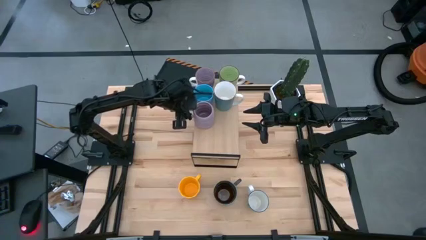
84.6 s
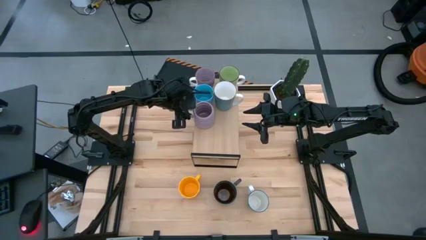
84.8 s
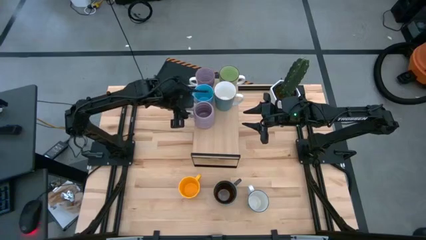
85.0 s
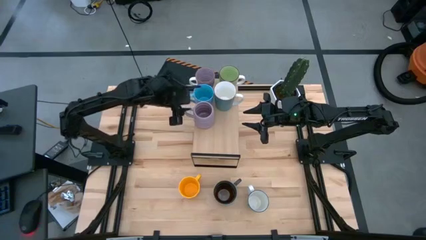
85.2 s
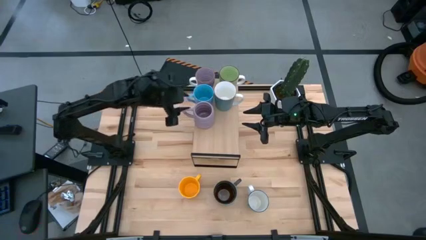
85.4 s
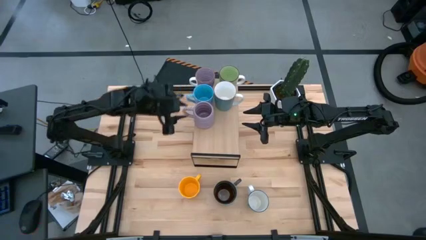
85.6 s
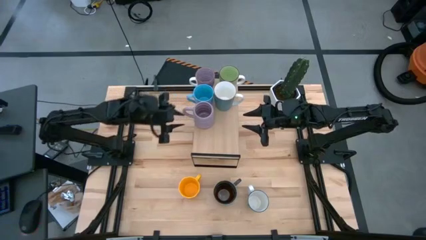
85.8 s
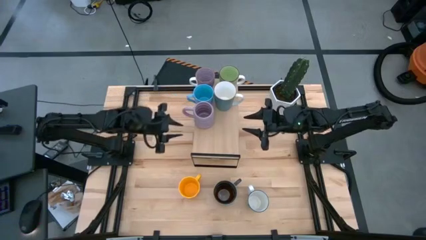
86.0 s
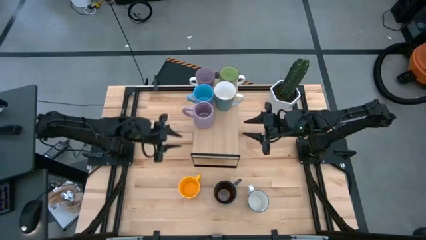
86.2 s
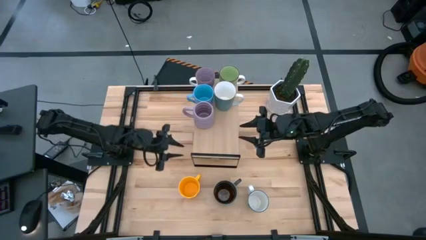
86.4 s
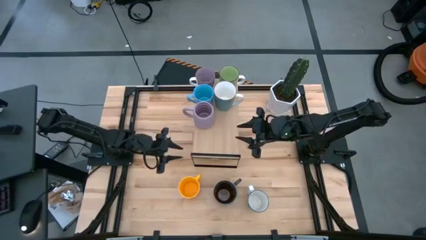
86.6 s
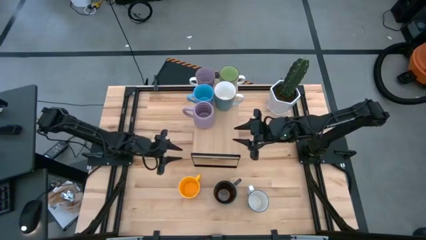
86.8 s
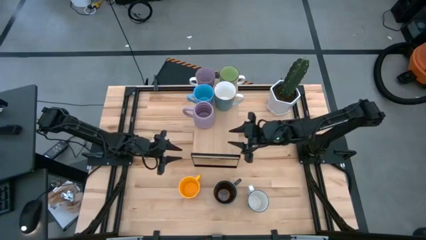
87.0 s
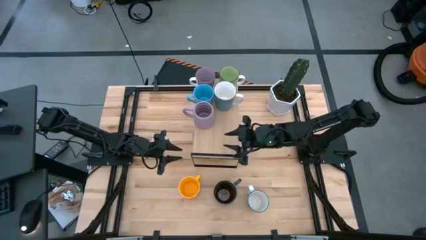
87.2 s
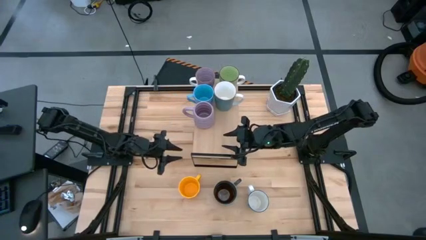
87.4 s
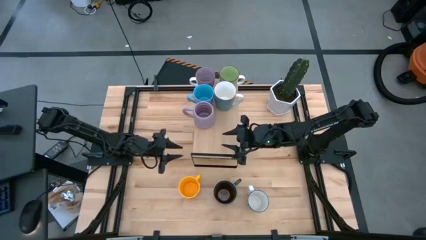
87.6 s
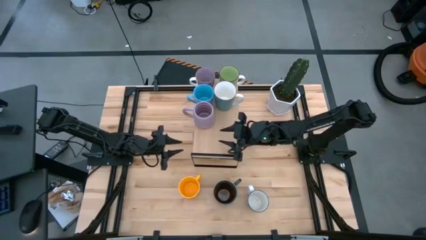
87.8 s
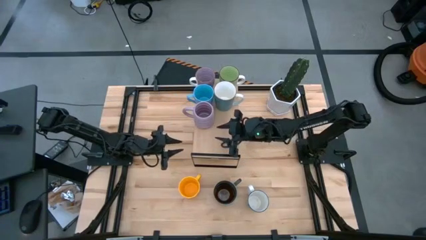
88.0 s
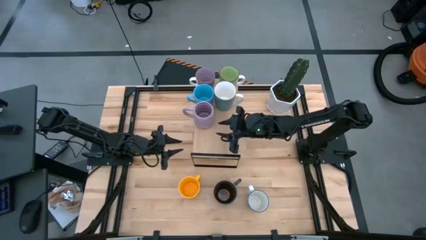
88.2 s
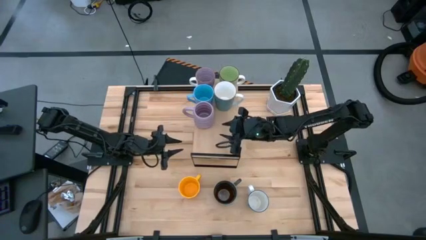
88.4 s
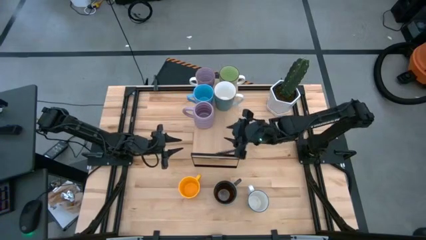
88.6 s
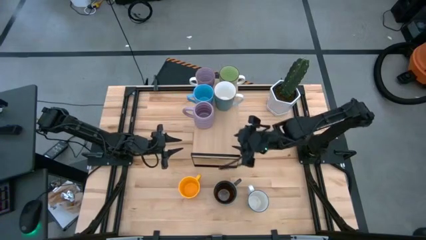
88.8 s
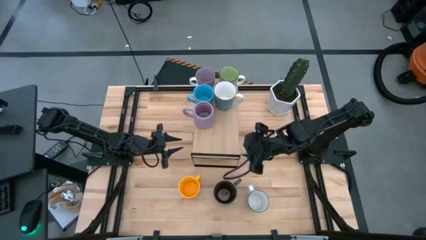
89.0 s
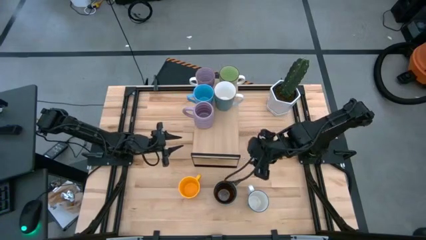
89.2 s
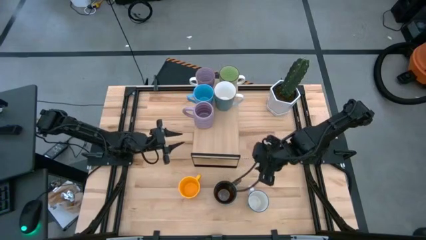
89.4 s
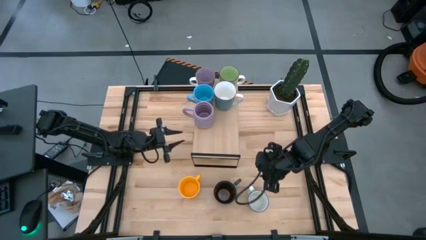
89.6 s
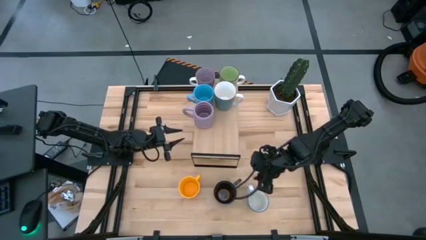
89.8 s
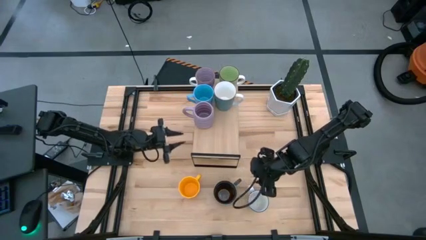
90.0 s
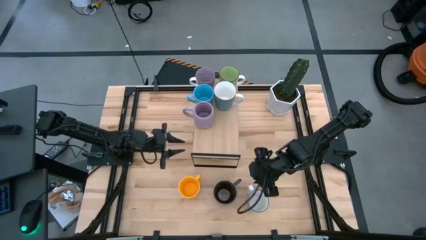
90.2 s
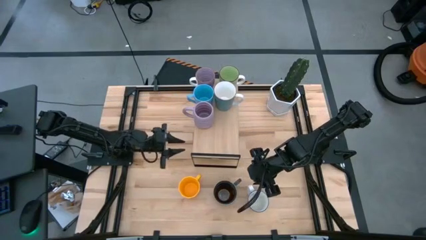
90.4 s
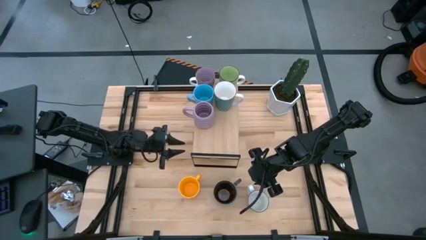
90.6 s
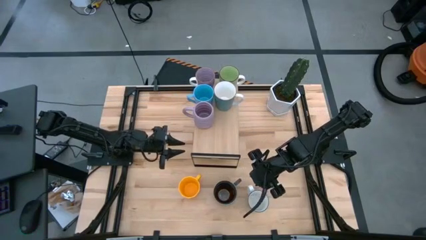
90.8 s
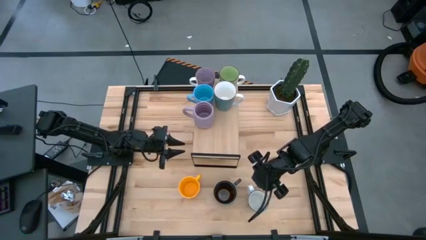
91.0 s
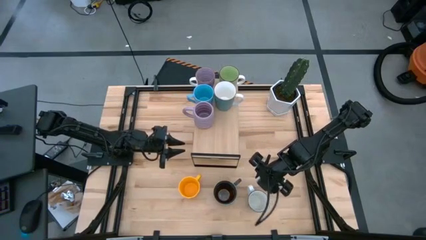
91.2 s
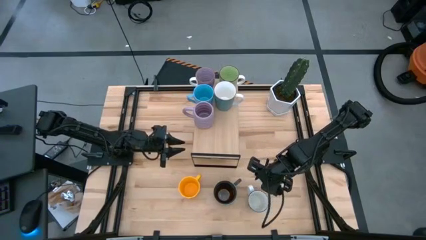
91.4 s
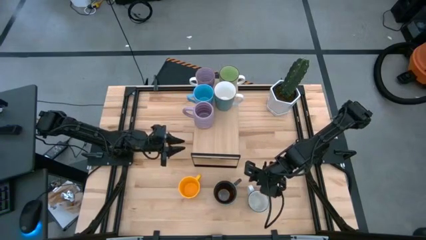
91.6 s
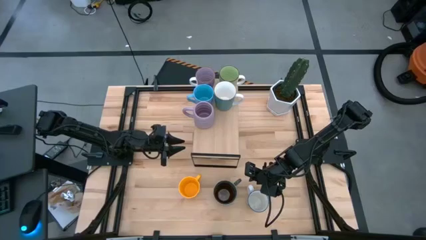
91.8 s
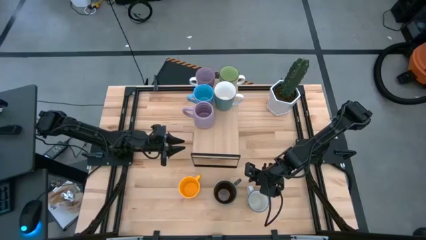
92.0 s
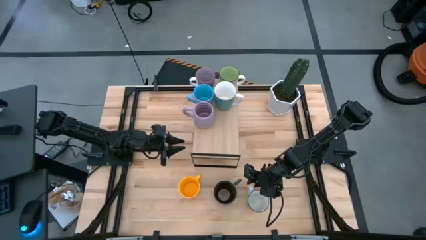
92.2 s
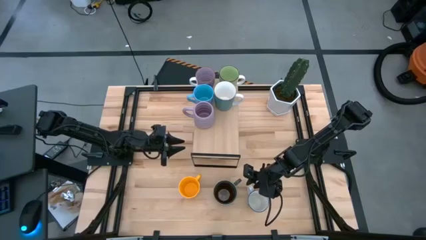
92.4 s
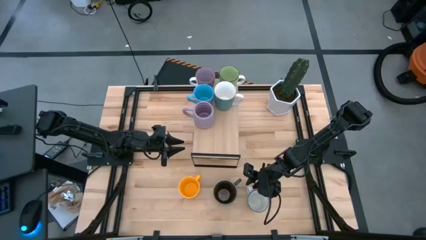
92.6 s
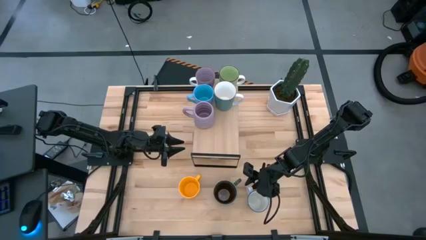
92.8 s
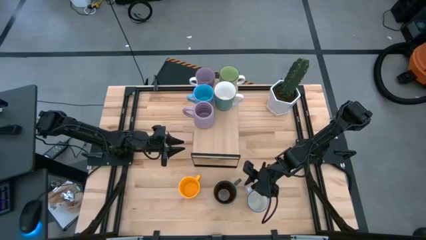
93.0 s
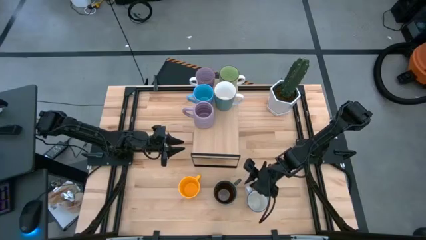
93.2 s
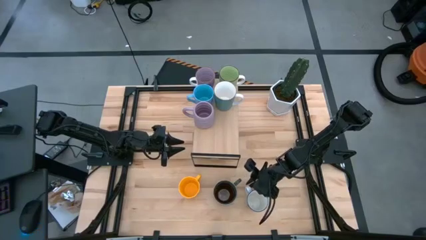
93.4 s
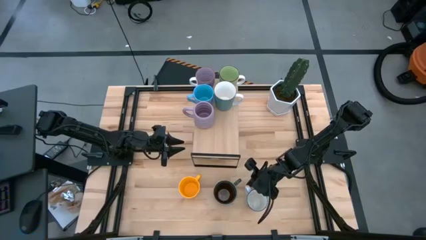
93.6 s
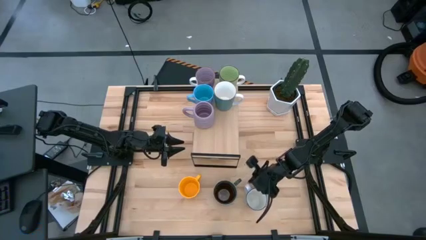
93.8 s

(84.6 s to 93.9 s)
Task: Place coffee mugs
Put the light blue mug on the shelf

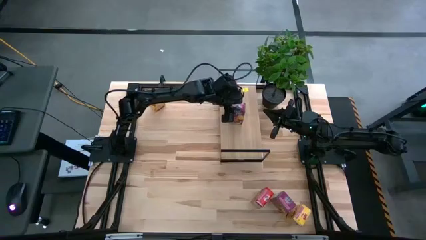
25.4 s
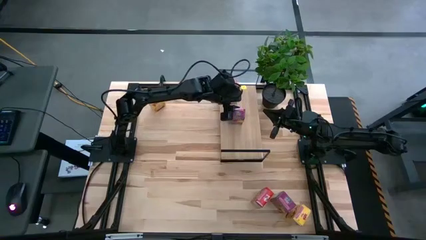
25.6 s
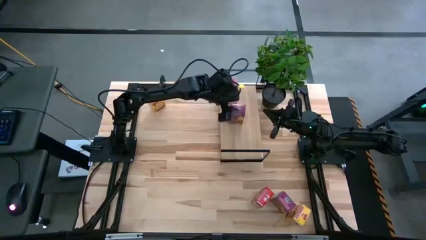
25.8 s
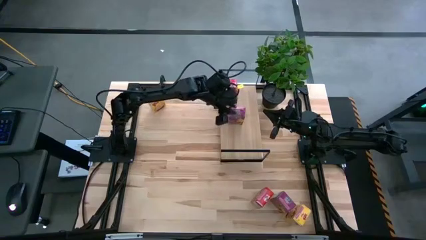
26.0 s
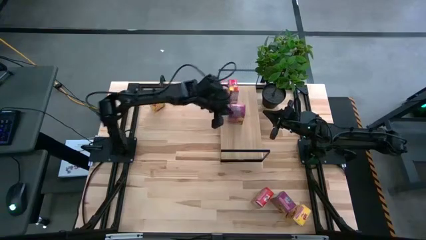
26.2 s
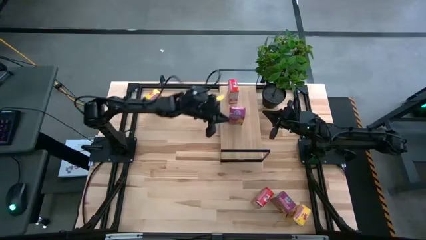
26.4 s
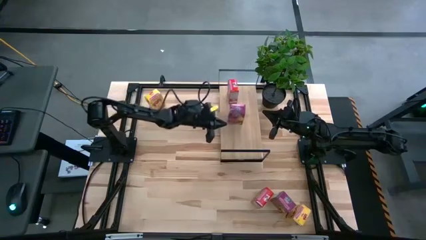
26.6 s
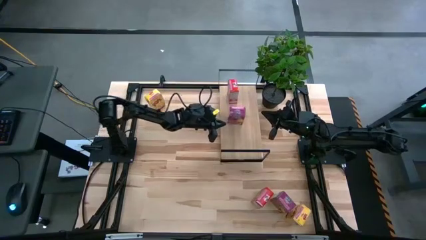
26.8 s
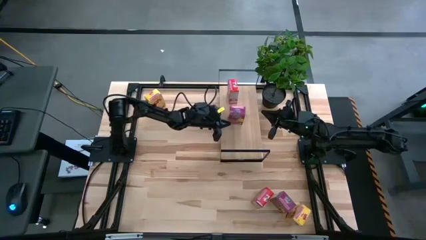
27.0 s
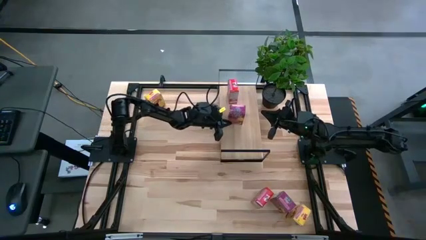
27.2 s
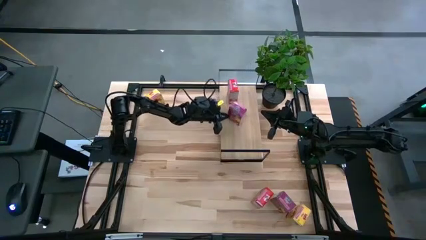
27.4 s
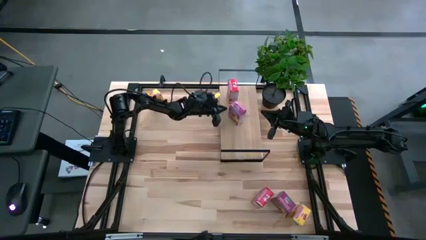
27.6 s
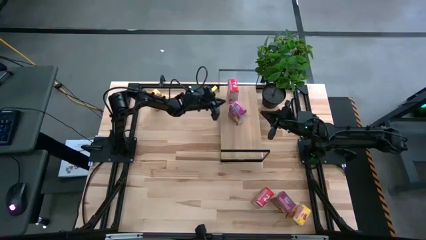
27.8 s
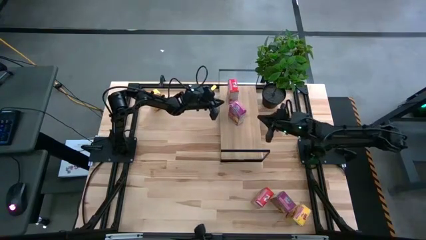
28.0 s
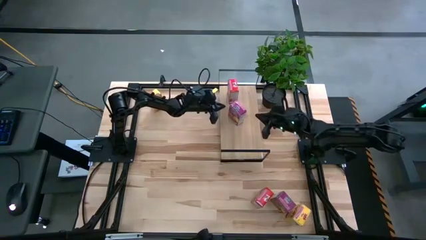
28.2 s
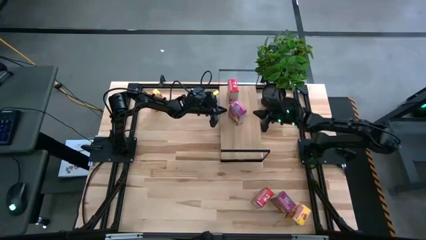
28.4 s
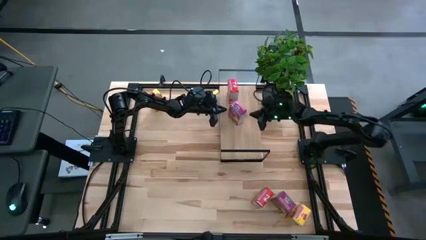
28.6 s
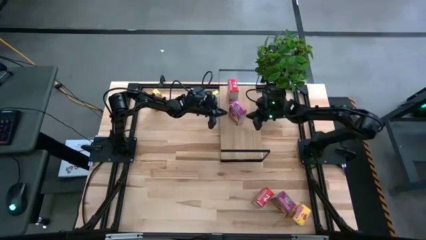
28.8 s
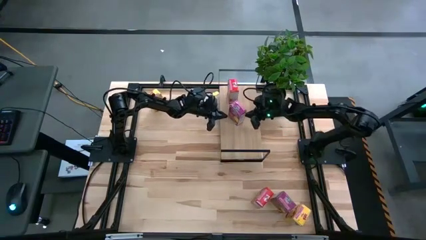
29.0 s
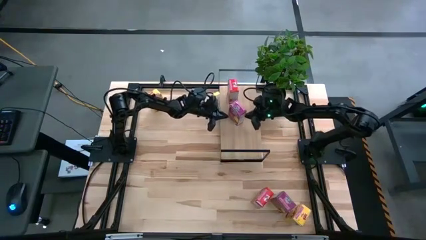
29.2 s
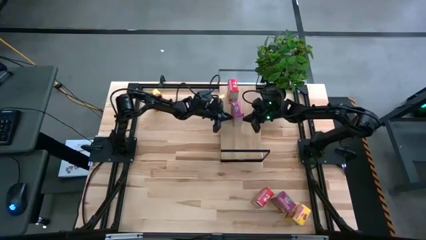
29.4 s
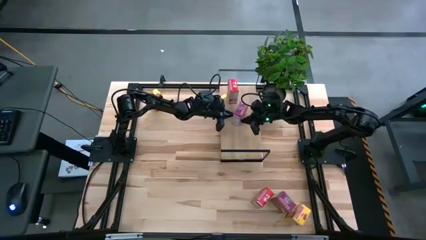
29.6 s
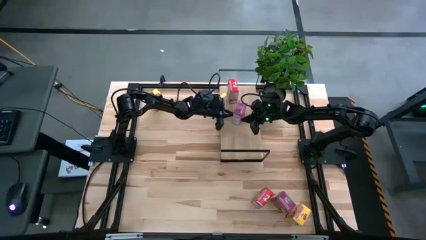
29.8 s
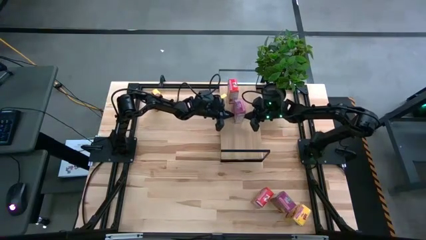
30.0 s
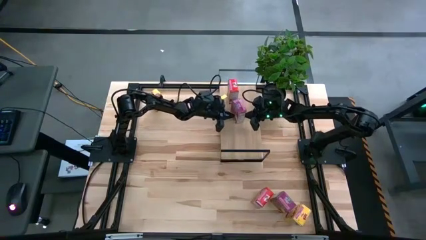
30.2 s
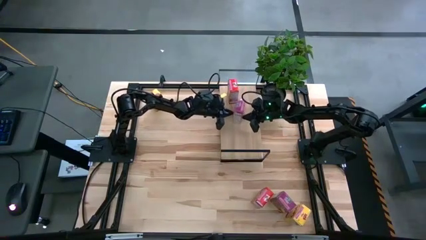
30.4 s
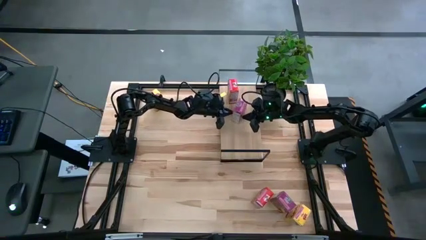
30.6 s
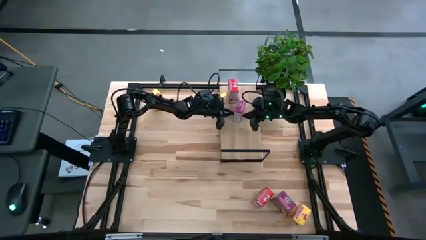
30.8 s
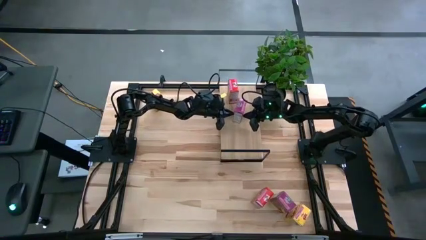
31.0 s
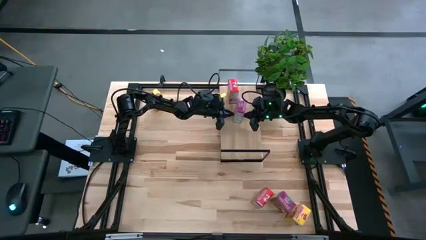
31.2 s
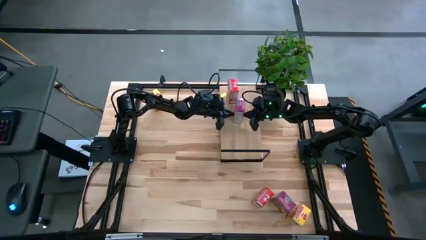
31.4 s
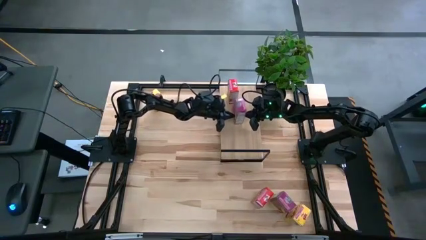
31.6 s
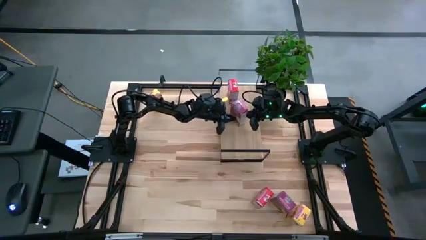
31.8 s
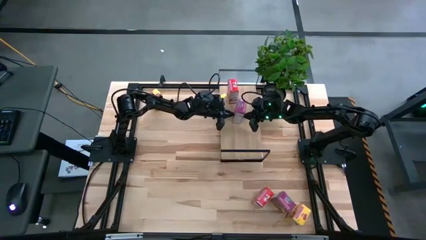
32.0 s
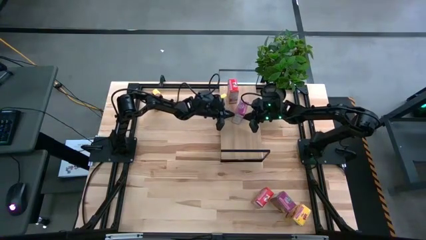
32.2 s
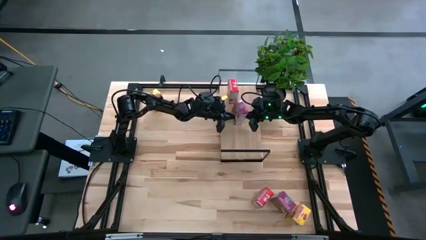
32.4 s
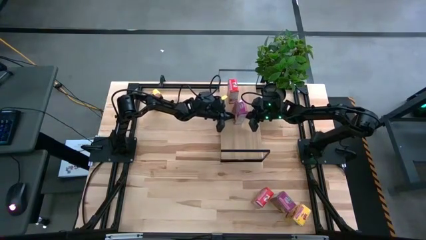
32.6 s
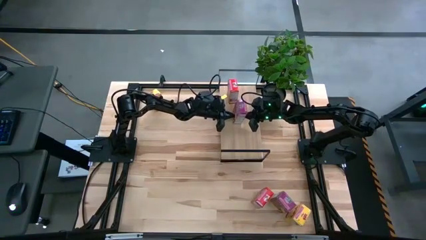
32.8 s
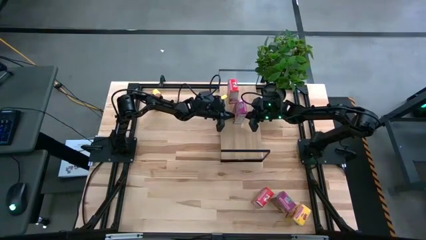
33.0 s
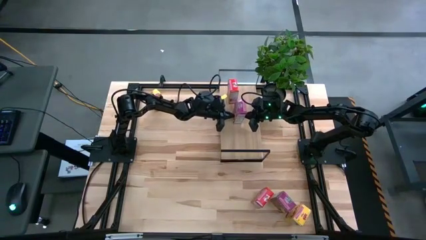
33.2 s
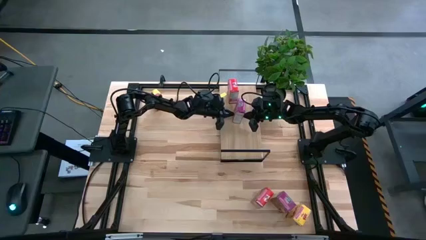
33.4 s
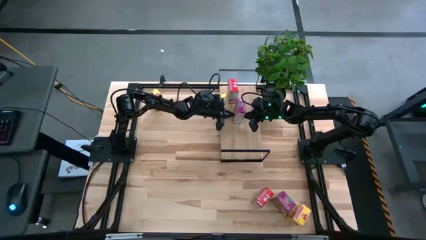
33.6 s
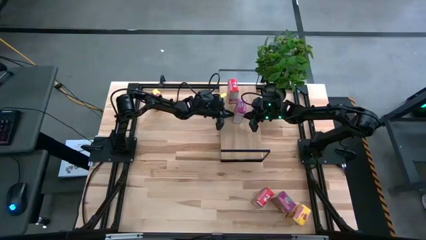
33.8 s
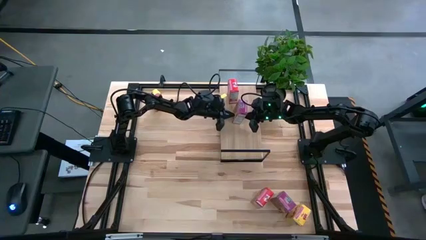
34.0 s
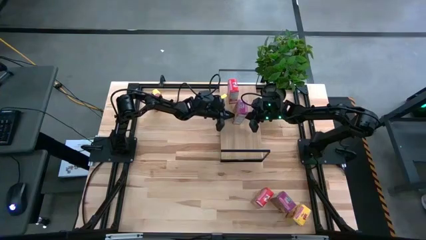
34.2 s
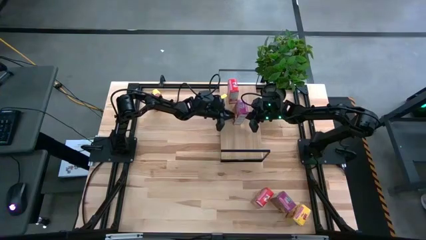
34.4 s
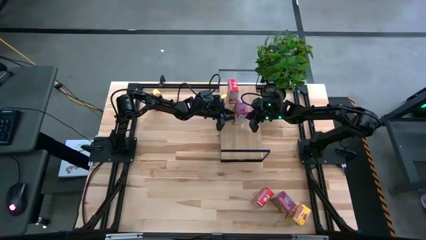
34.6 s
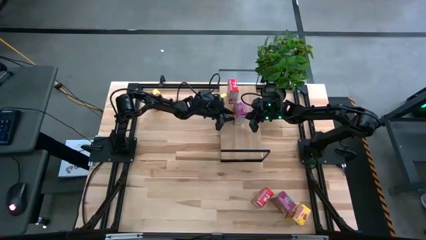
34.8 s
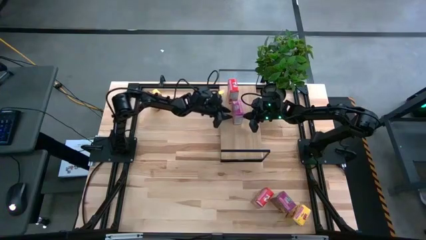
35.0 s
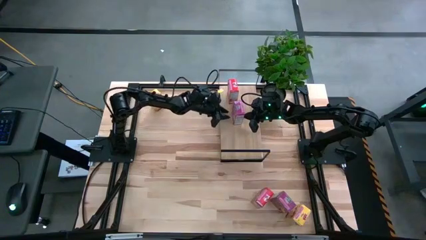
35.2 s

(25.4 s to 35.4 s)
Task: Stack cereal on shelf
Adjust the purple cereal box on the shelf
